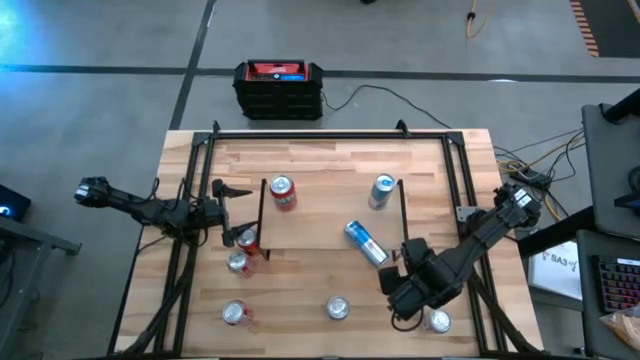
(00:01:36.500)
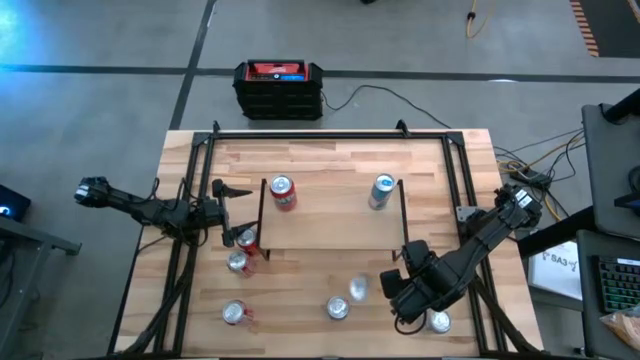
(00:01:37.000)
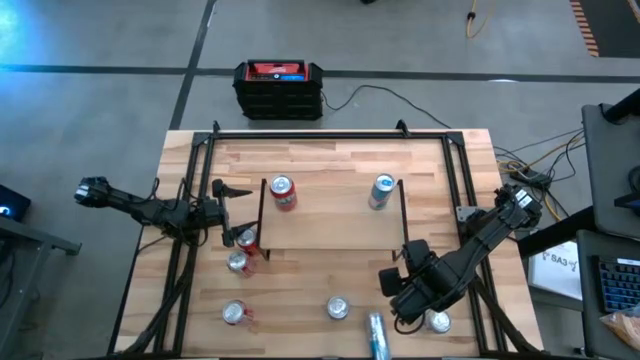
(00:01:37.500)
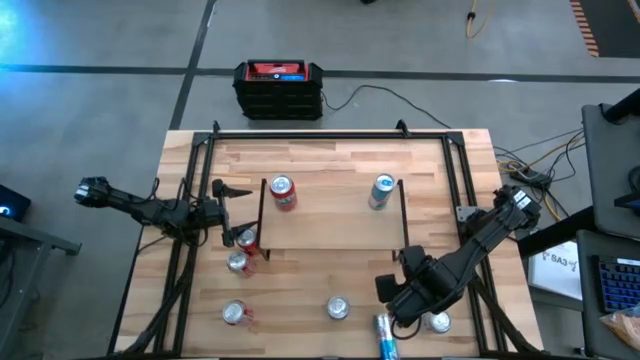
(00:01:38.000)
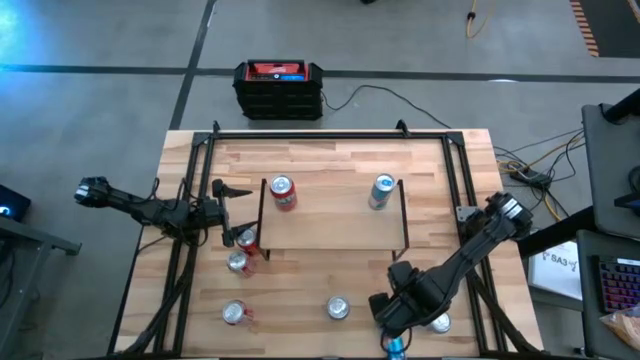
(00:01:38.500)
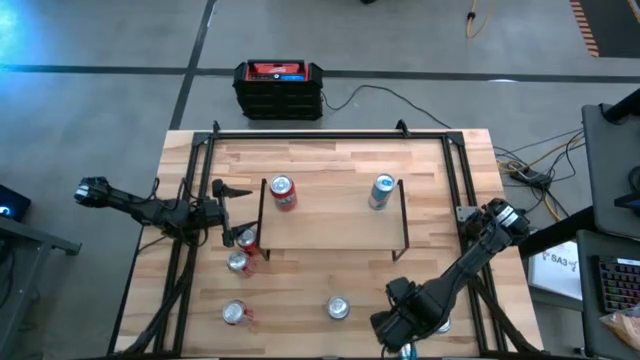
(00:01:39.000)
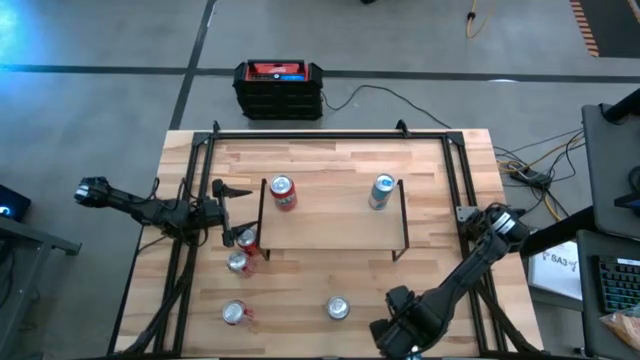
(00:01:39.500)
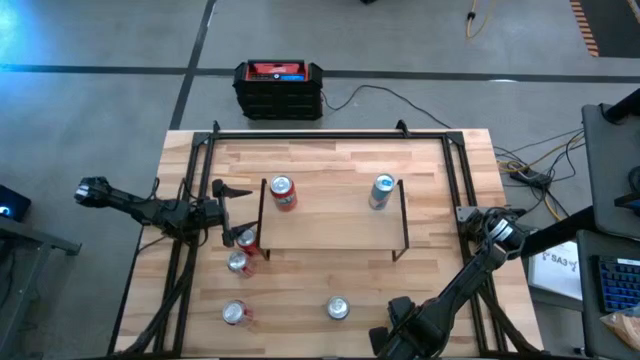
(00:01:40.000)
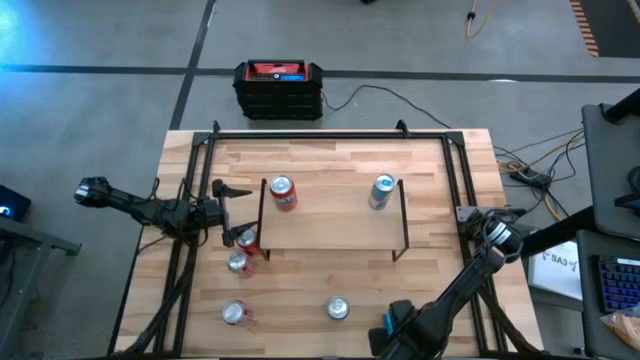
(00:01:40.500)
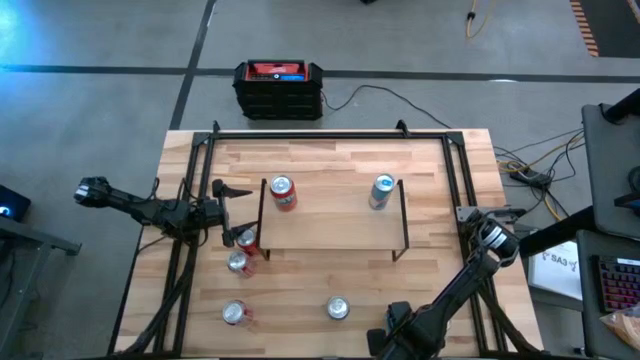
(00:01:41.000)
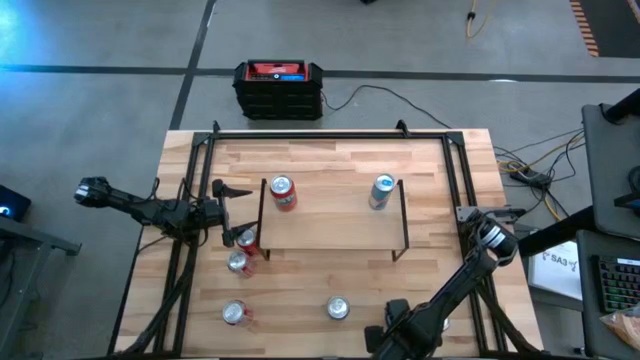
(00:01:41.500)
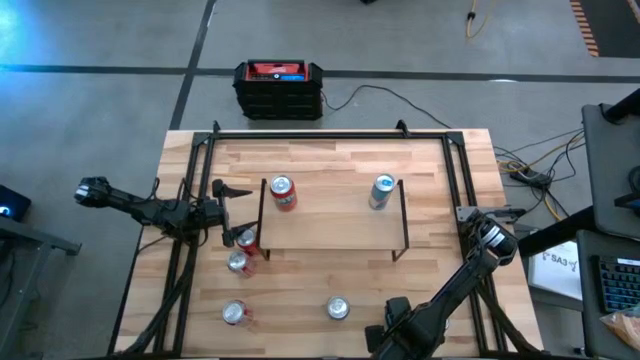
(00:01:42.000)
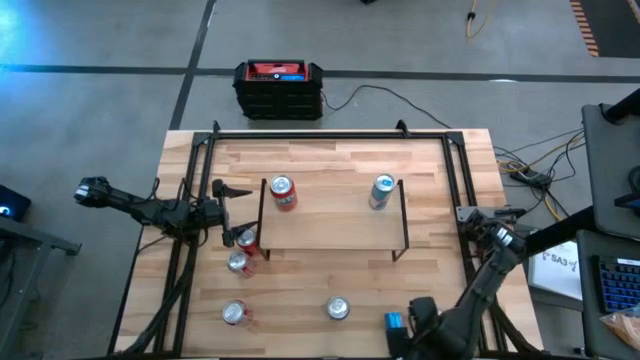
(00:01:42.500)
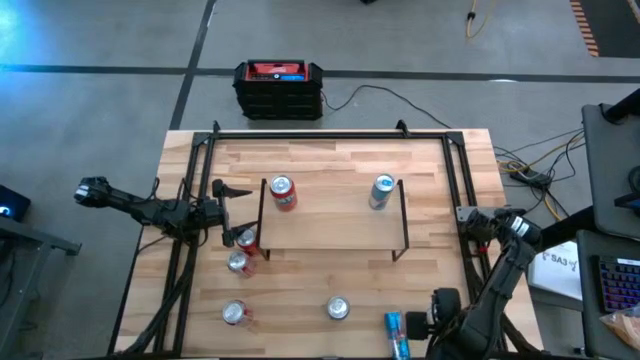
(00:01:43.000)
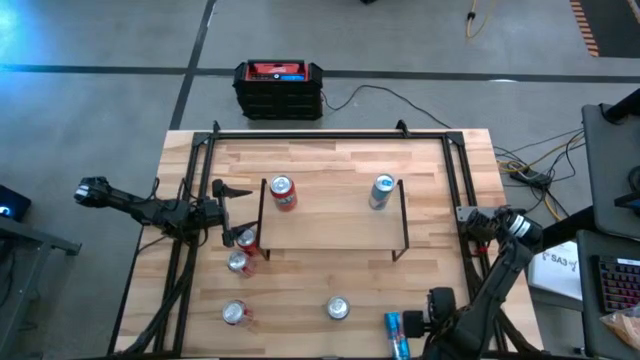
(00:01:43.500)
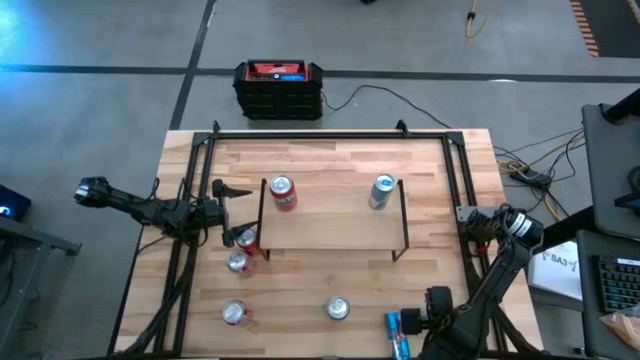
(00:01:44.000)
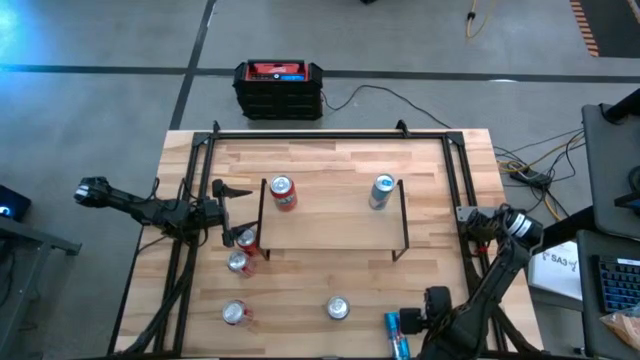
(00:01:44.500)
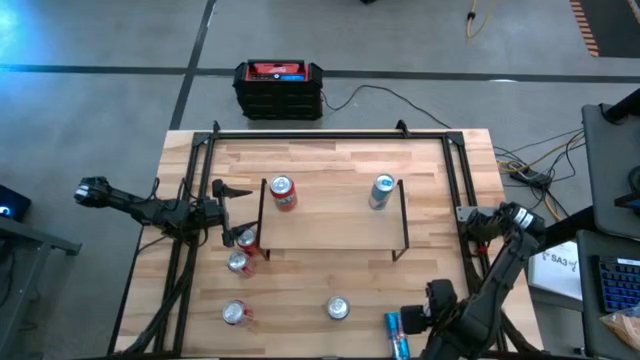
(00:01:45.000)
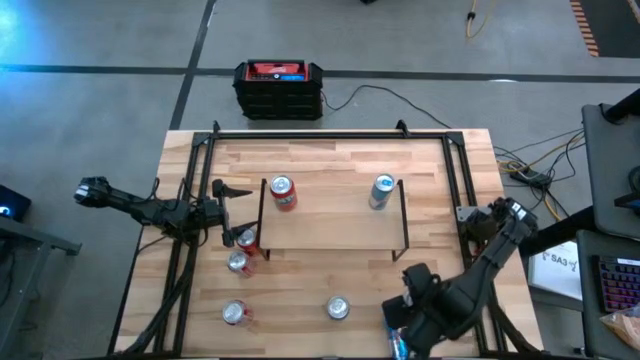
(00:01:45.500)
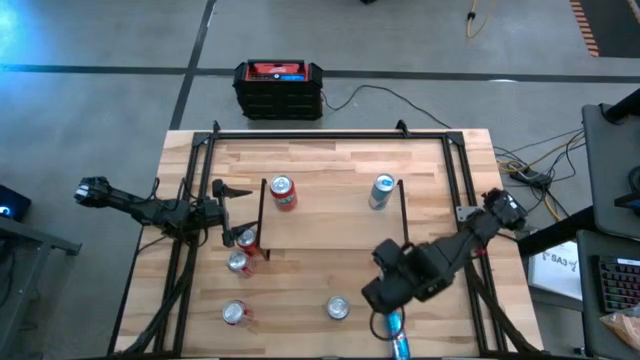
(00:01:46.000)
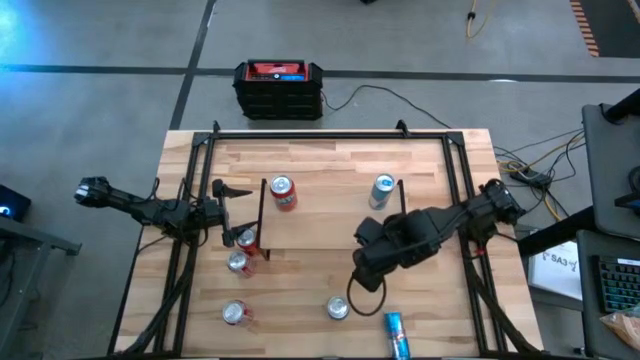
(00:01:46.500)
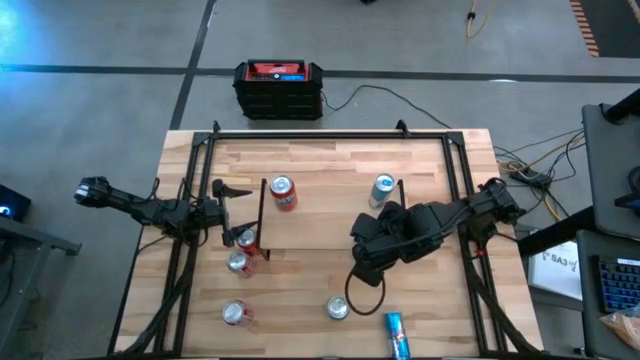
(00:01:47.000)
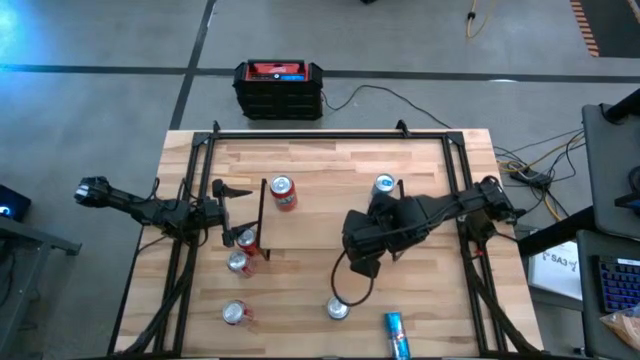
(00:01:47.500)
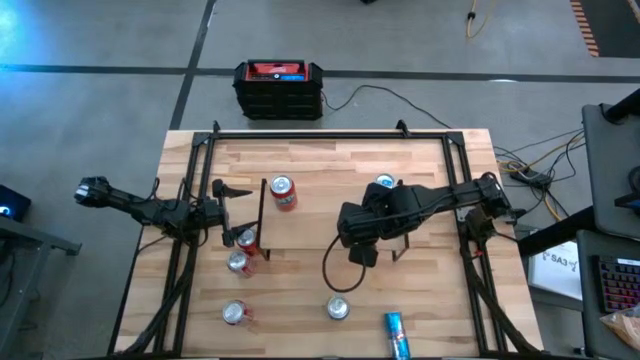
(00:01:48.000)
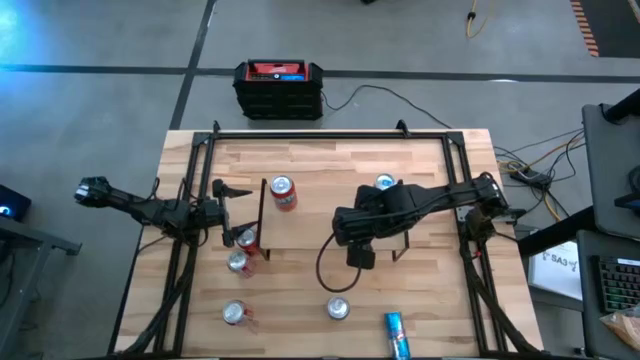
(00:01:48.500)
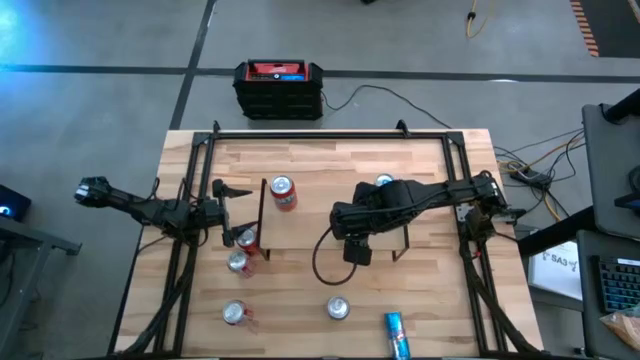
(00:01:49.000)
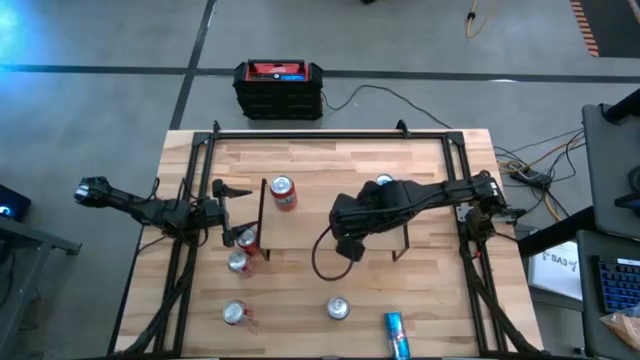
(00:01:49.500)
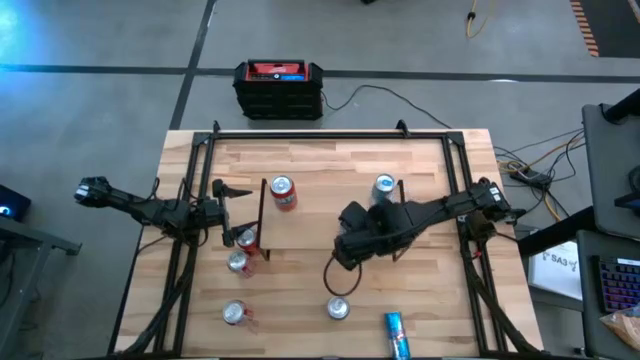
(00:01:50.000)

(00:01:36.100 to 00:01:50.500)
Task: Place canned beverage on shelf
Put the right silver red soda can on the shelf

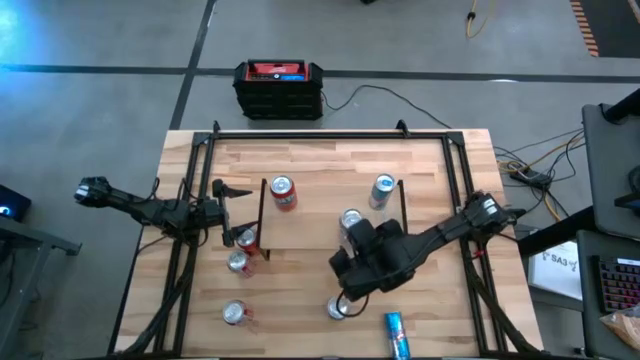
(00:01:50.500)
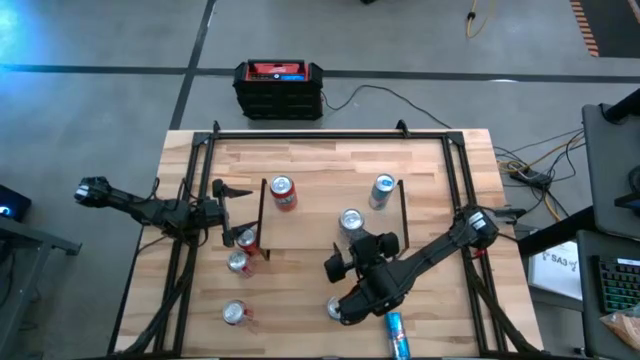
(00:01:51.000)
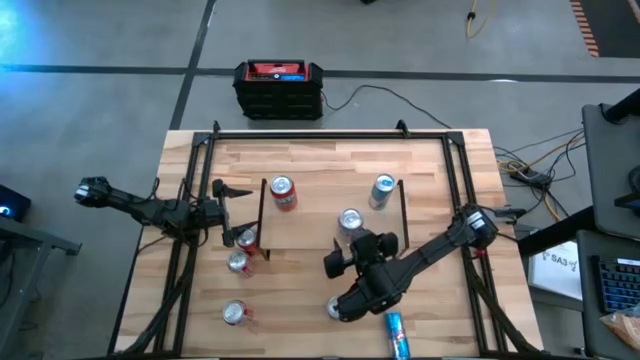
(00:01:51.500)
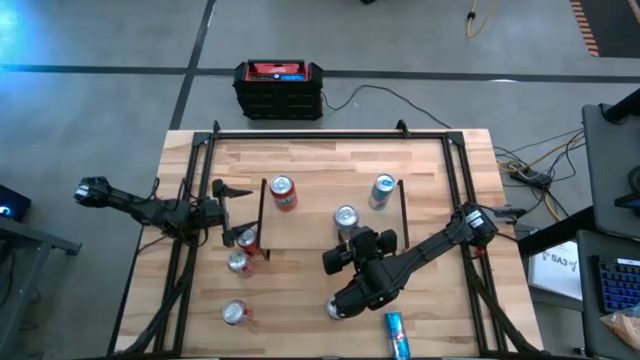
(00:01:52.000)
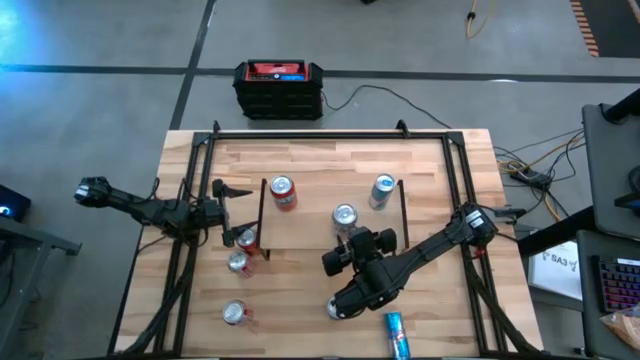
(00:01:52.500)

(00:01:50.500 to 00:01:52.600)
Put the right silver red soda can on the shelf

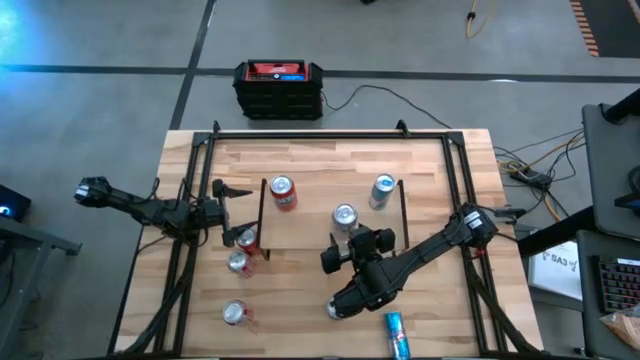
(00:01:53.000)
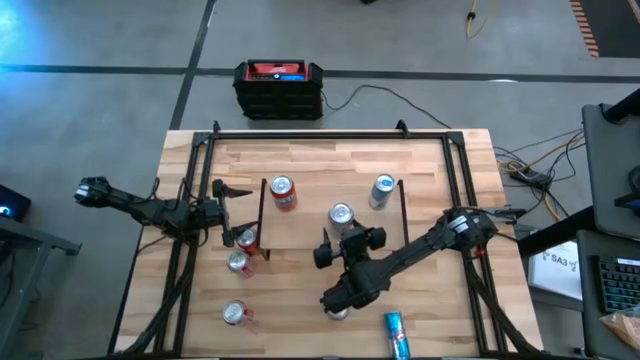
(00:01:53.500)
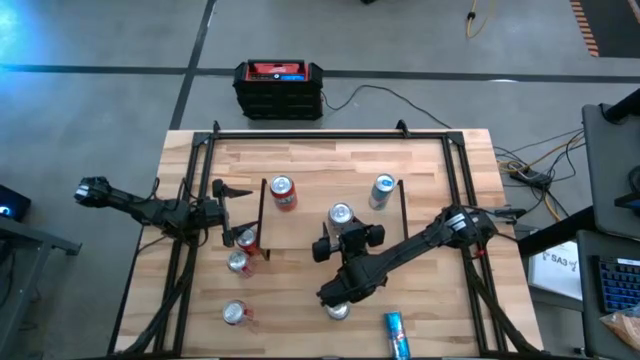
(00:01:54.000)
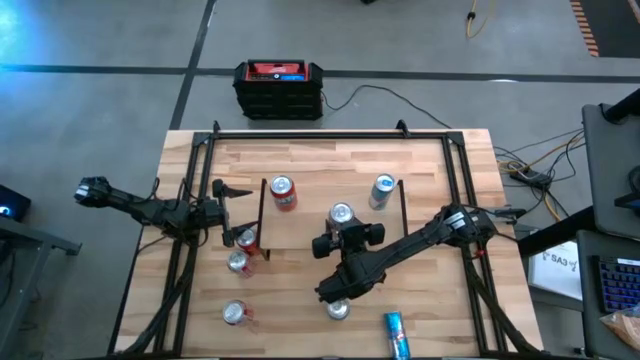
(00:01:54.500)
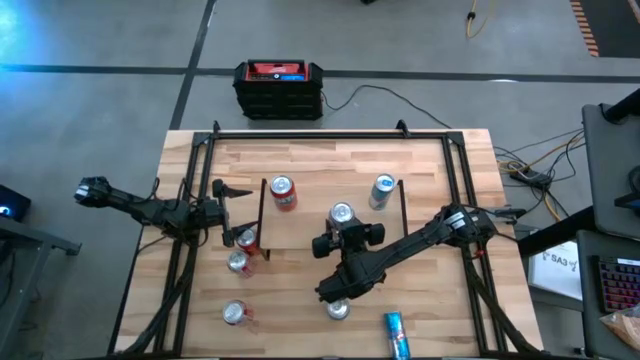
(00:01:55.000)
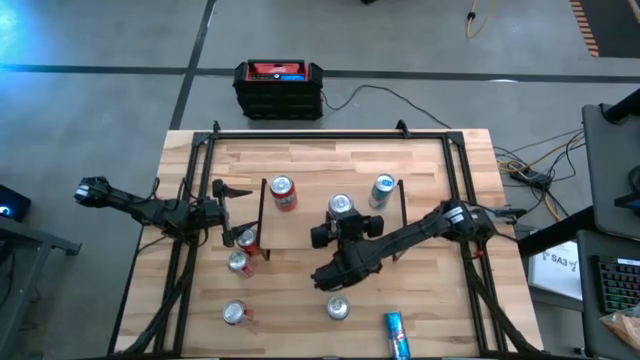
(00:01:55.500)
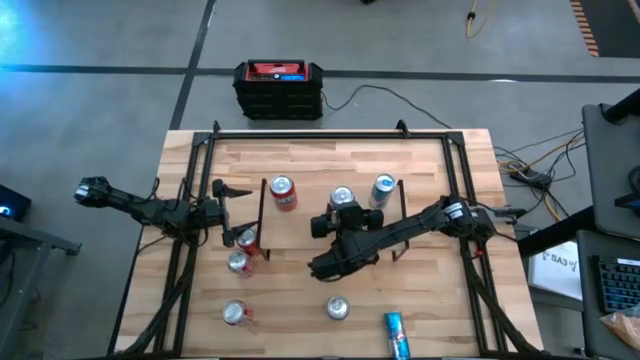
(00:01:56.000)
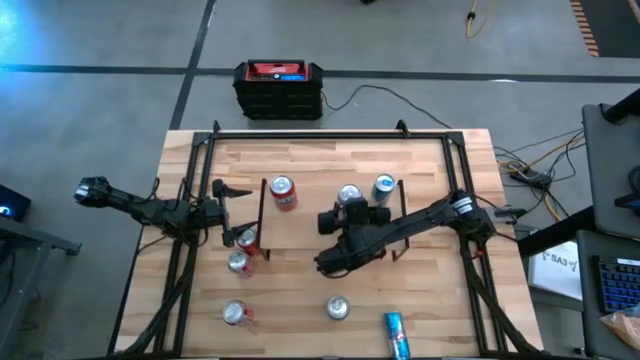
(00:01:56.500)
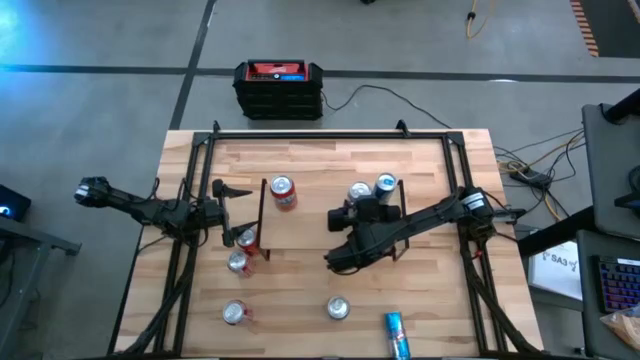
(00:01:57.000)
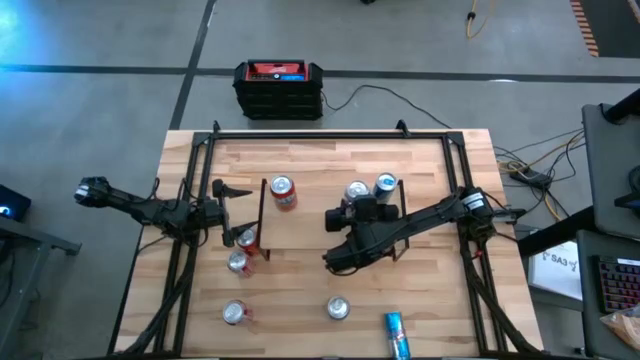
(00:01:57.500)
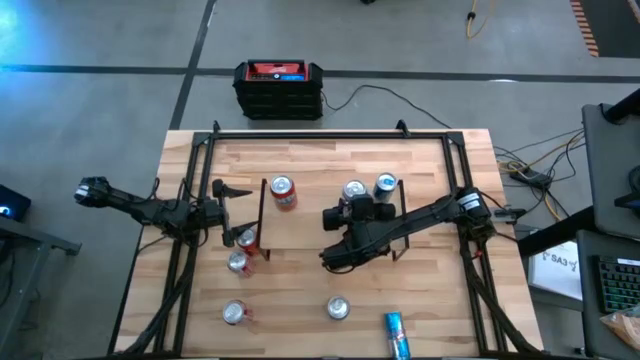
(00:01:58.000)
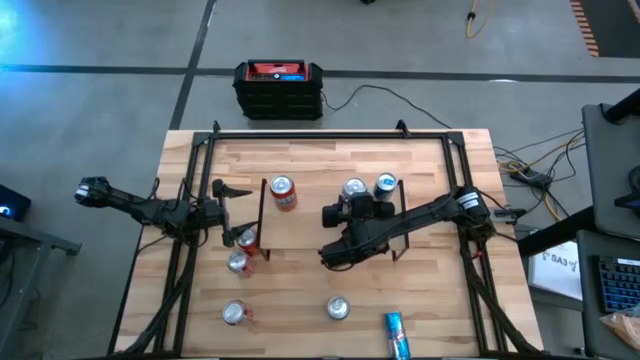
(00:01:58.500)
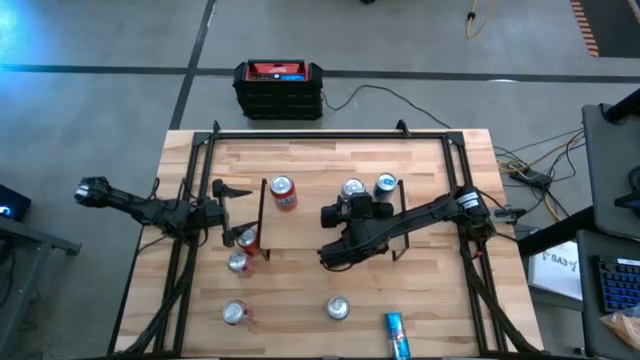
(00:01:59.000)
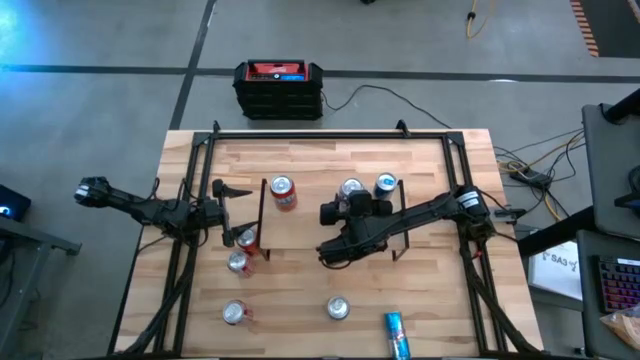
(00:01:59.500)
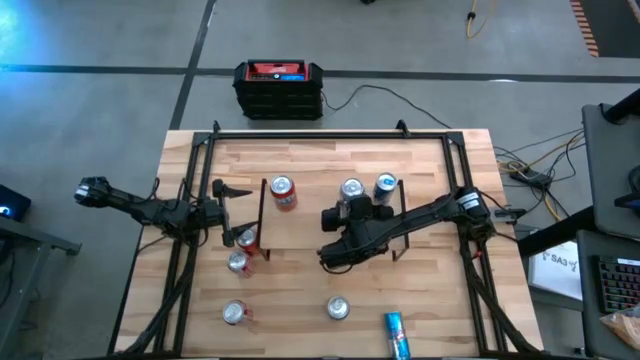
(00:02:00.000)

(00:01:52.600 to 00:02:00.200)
Put the right silver red soda can on the shelf
